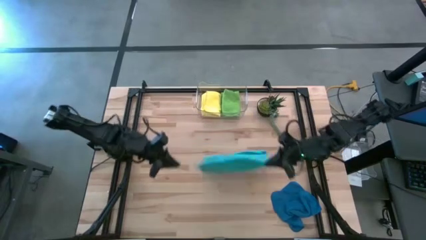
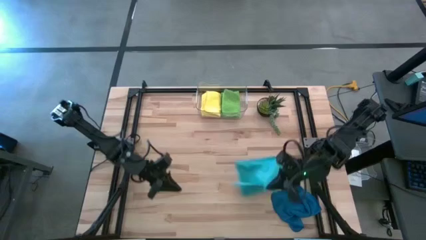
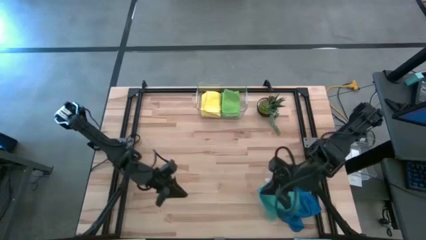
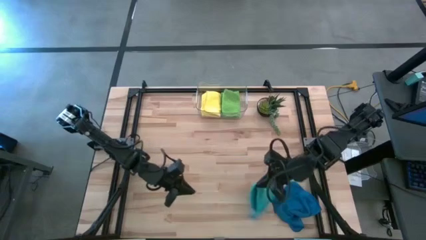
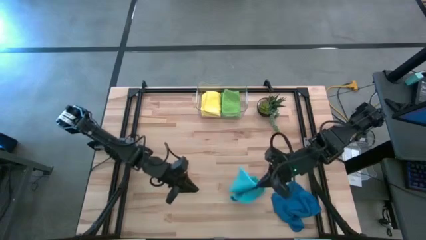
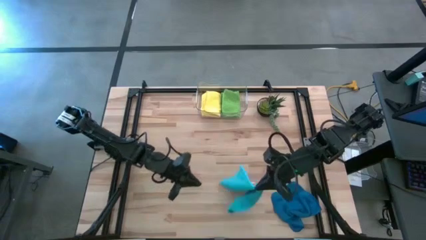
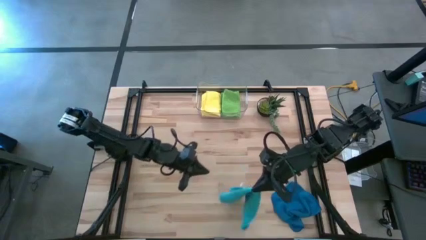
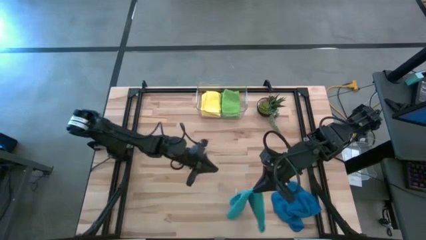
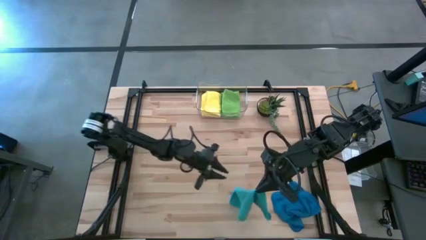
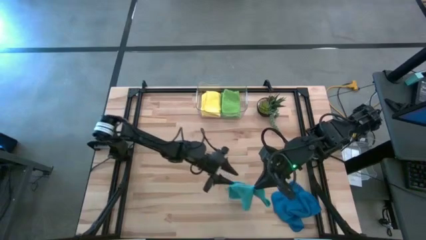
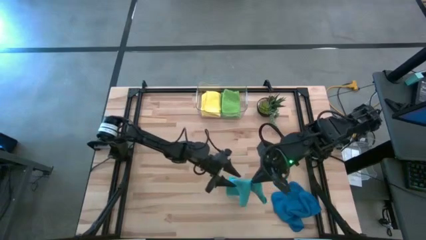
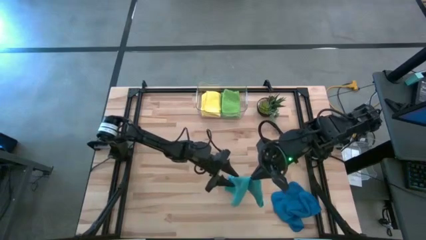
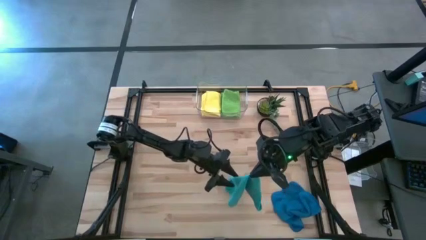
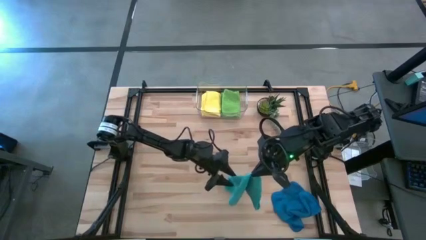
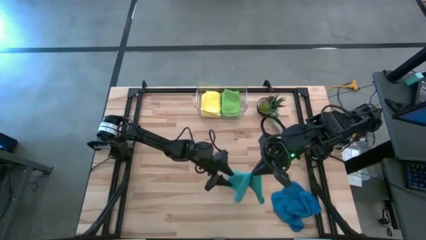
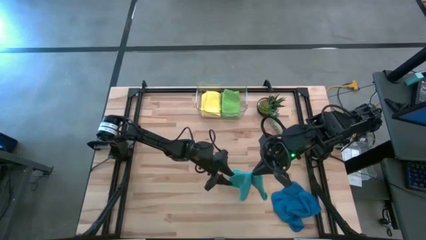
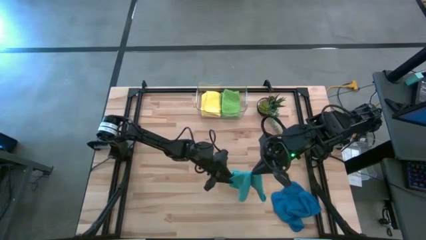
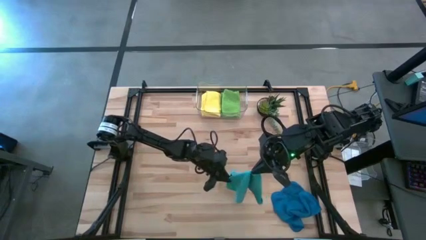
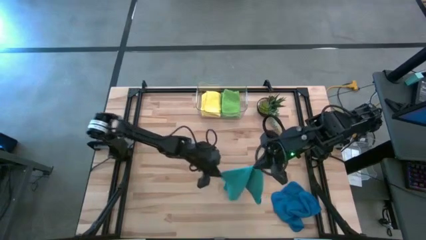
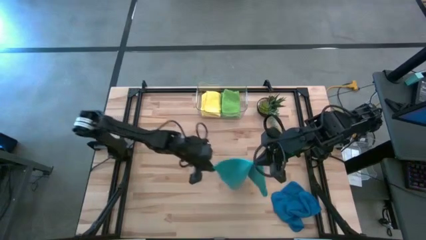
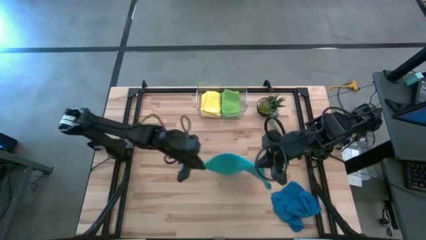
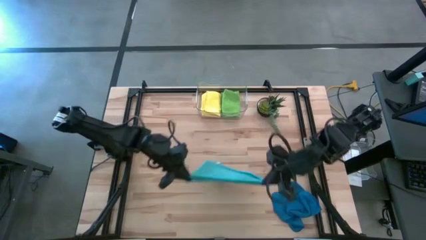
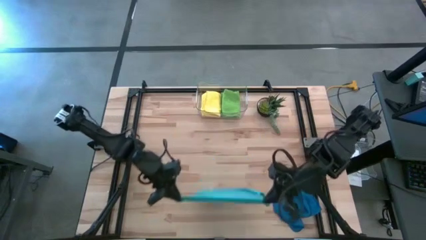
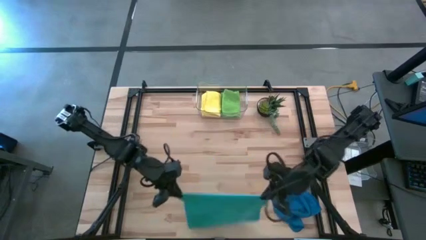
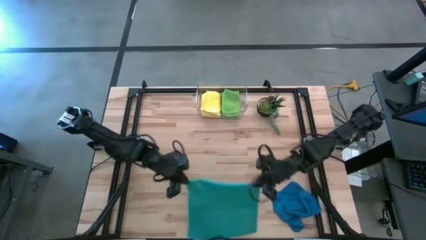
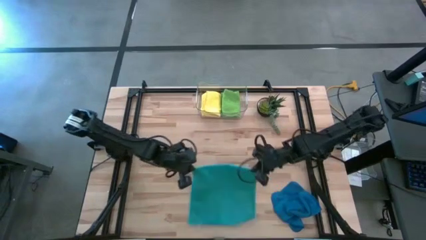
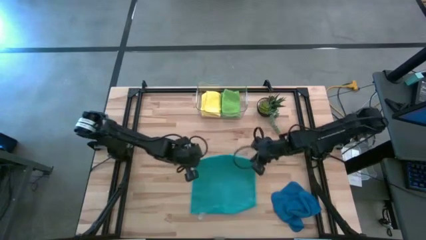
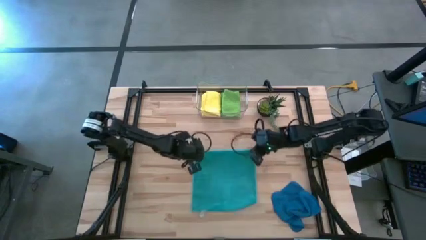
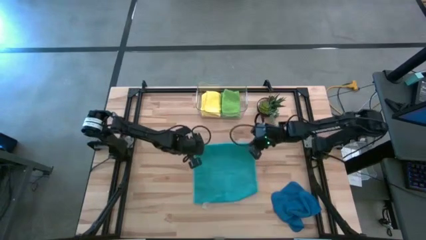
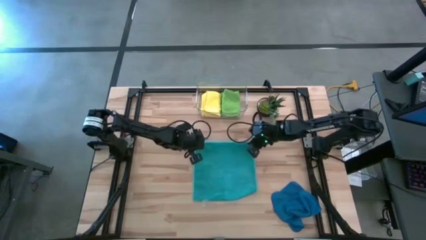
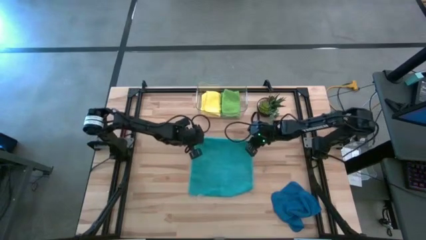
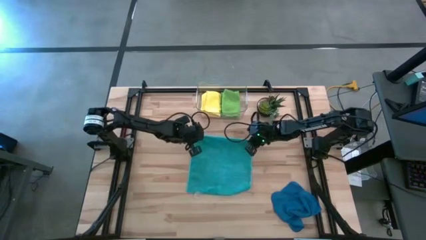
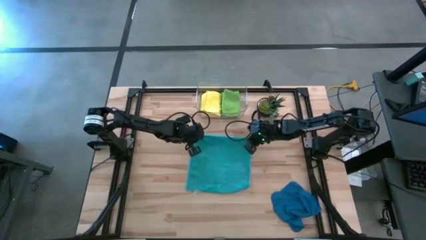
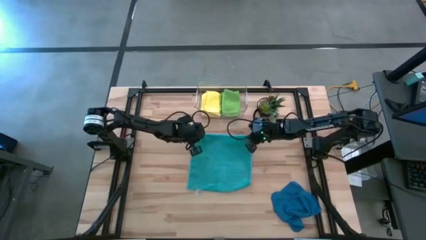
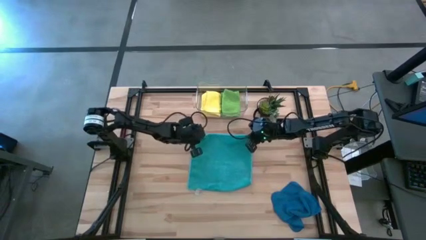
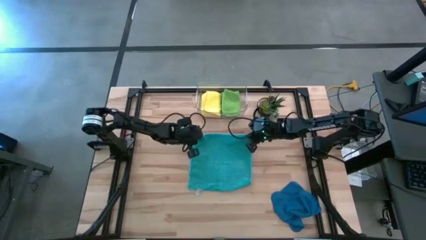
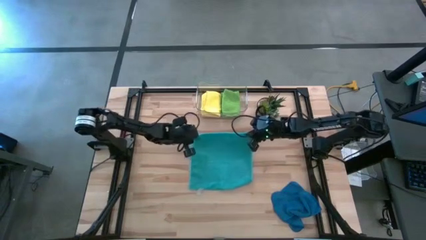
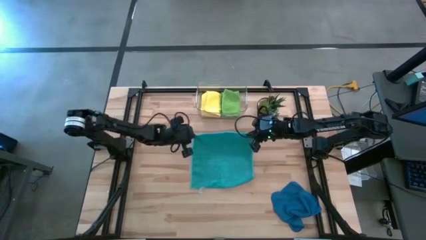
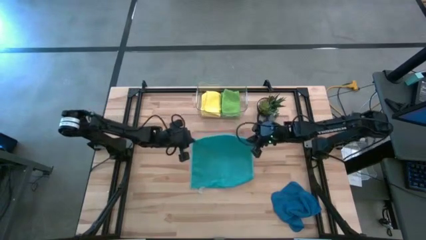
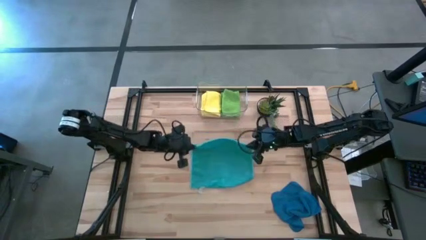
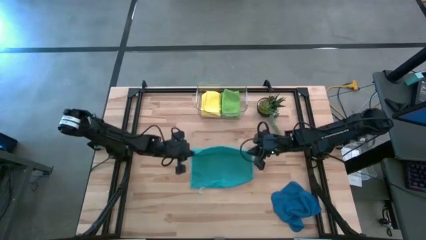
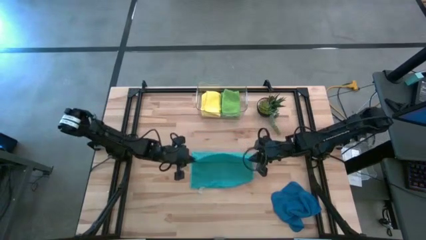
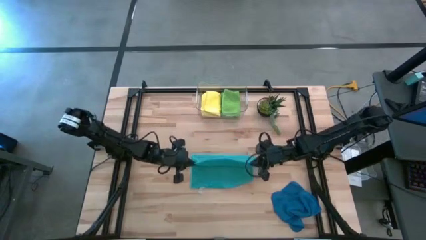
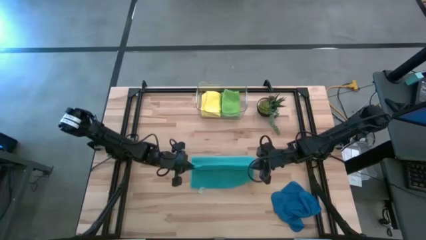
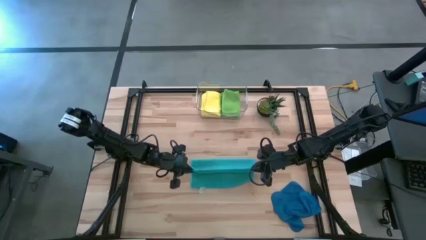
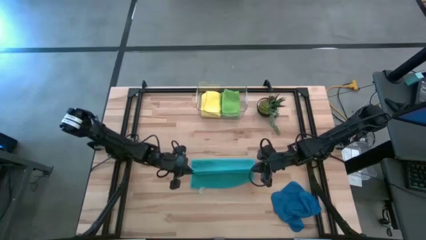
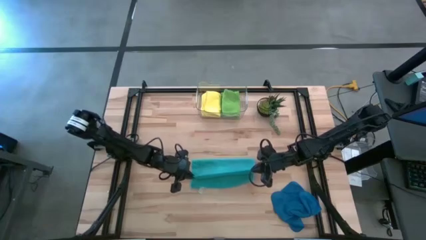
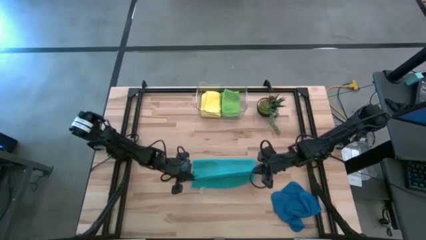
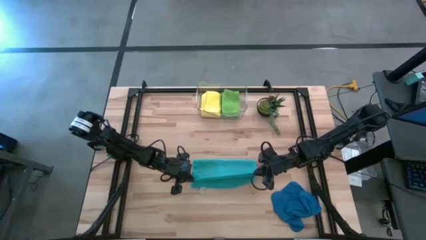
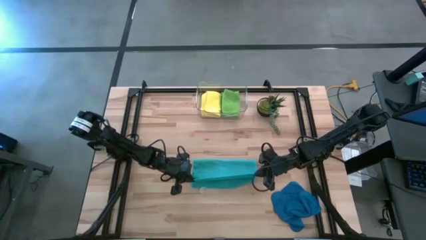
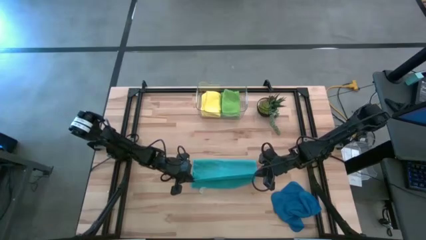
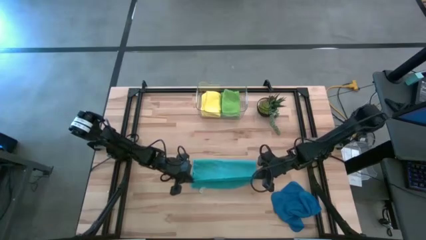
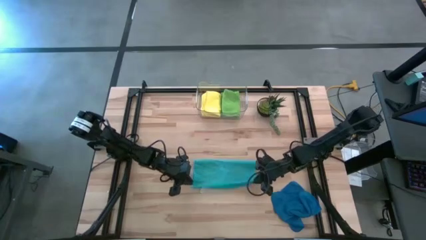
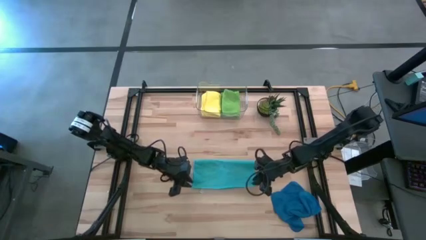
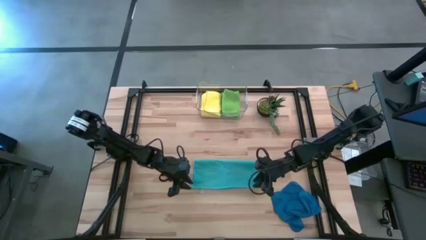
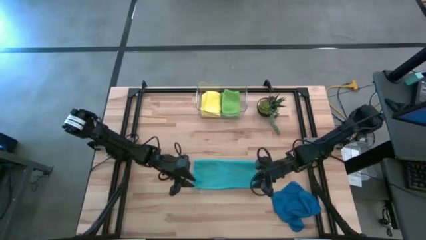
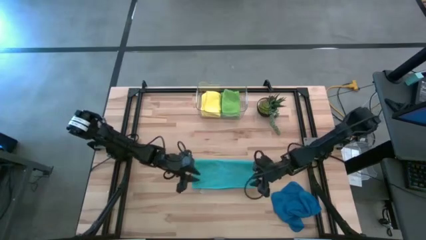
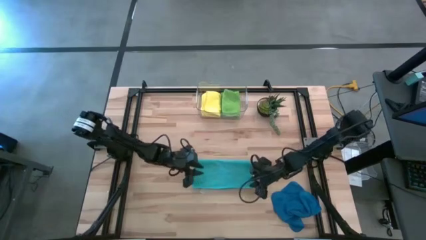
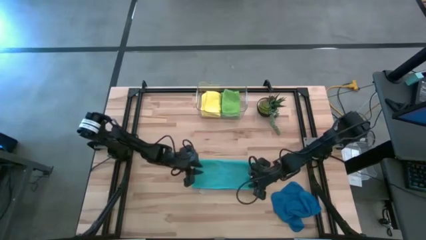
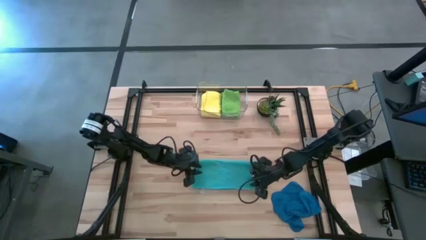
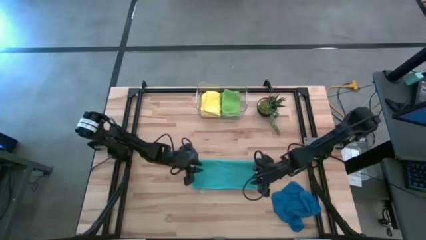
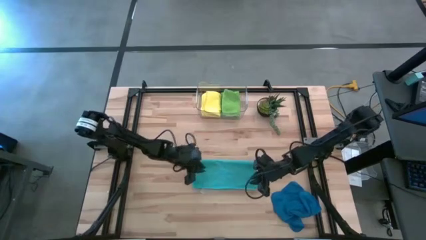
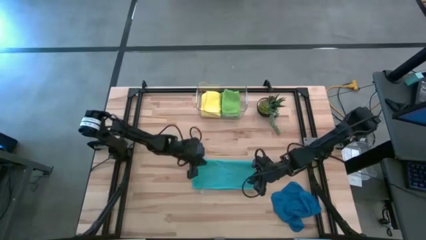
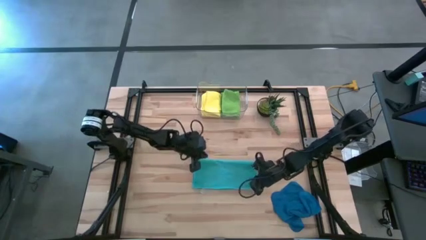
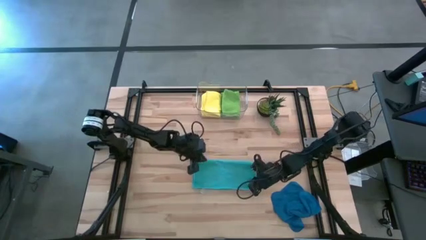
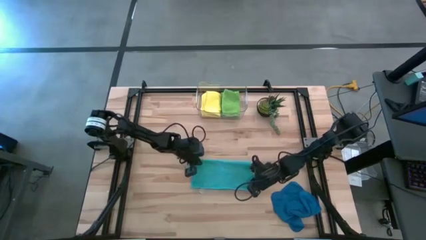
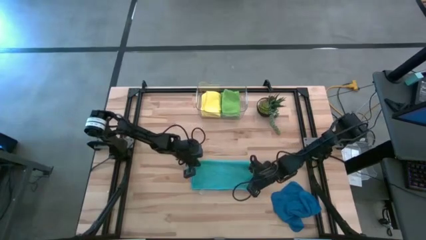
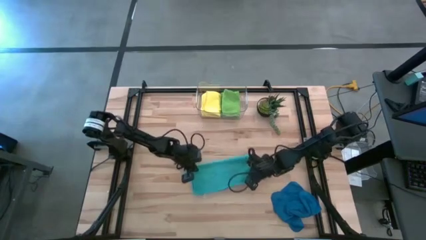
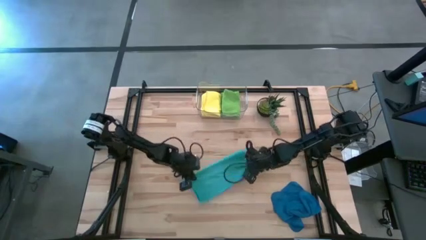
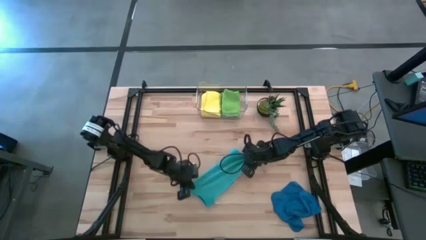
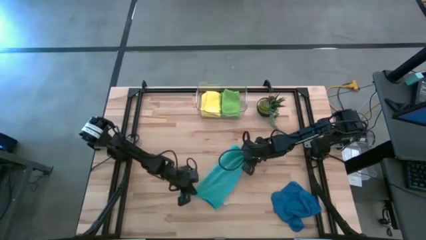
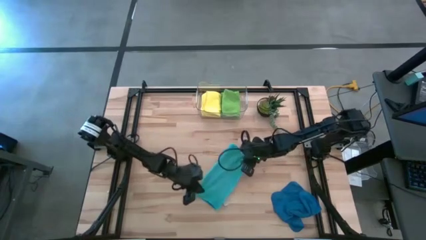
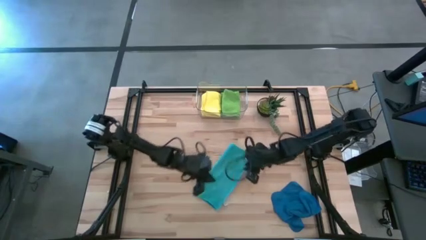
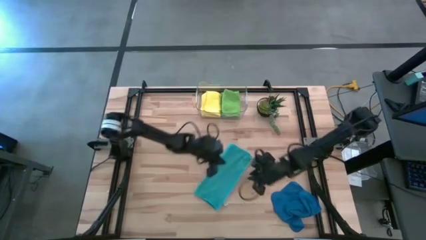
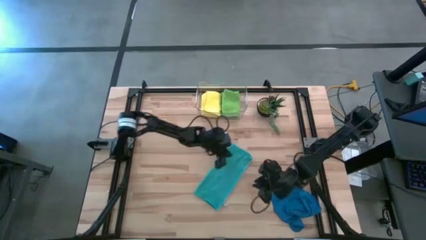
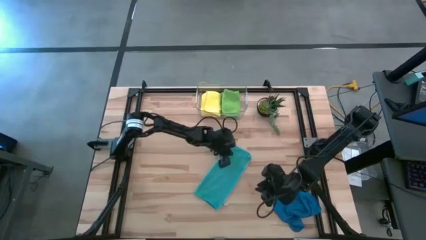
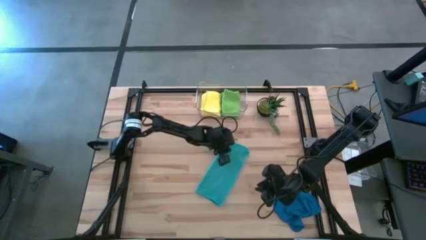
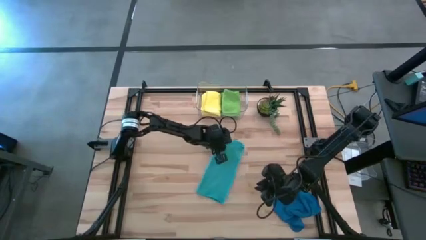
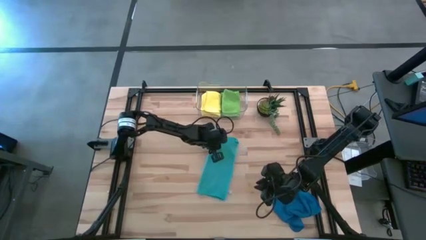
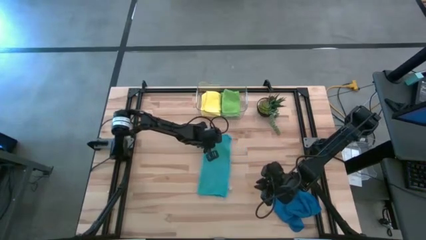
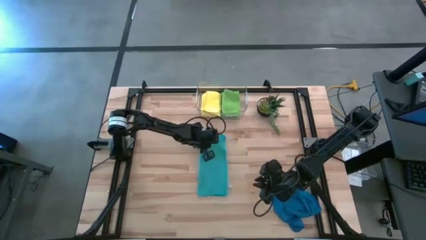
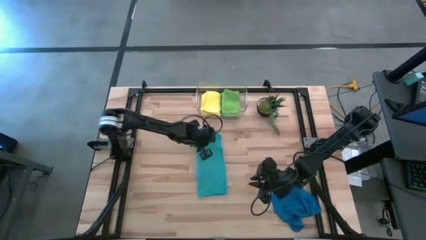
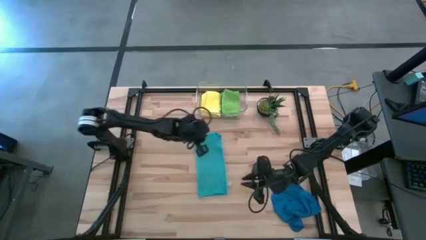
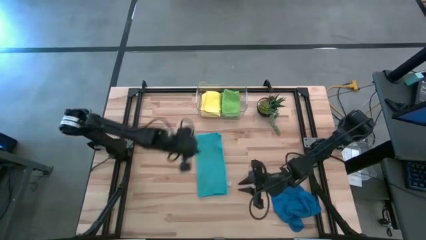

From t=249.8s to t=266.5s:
Task: Fold microfiber towels
Fold the light blue microfiber towel
